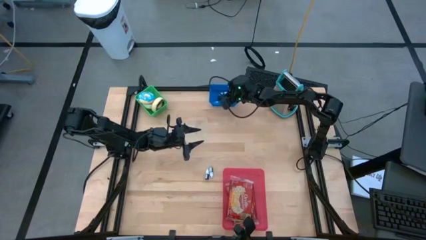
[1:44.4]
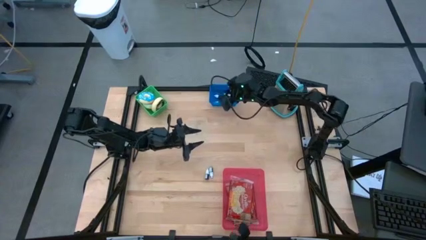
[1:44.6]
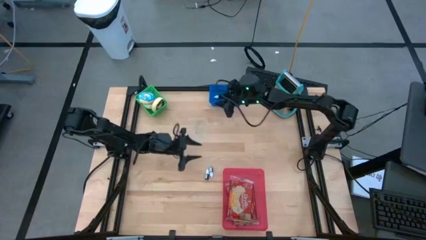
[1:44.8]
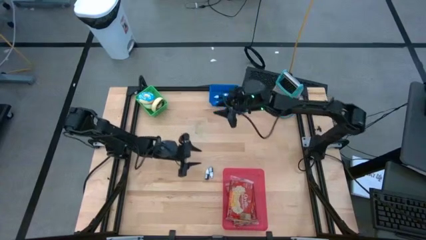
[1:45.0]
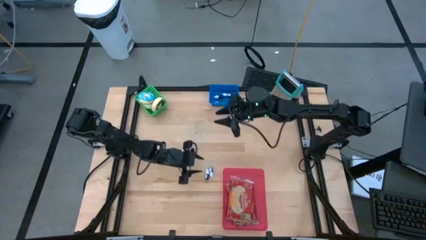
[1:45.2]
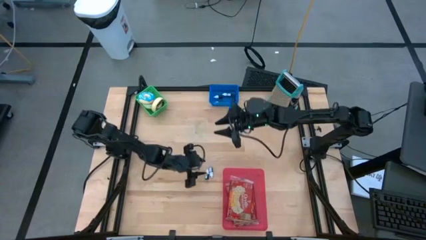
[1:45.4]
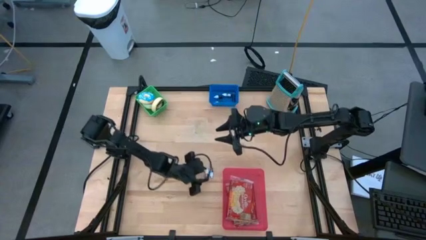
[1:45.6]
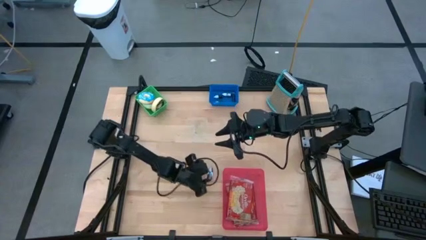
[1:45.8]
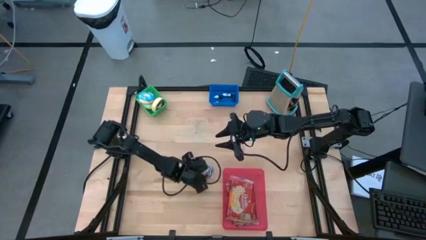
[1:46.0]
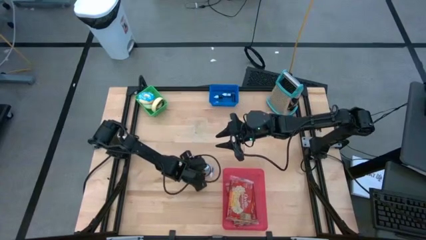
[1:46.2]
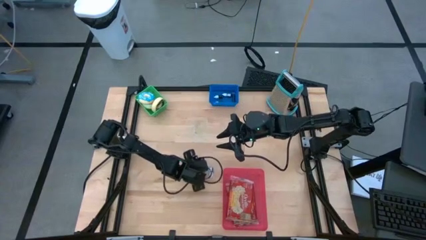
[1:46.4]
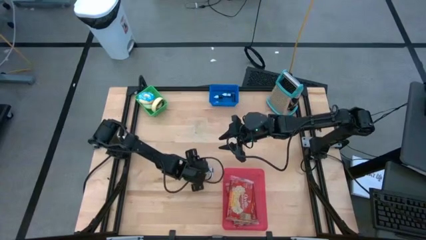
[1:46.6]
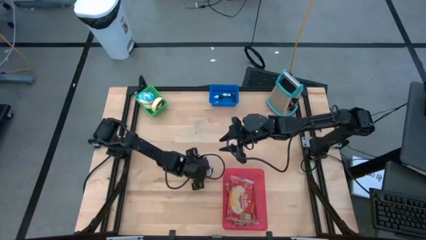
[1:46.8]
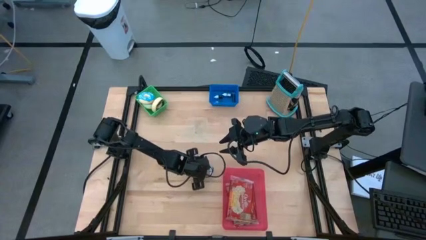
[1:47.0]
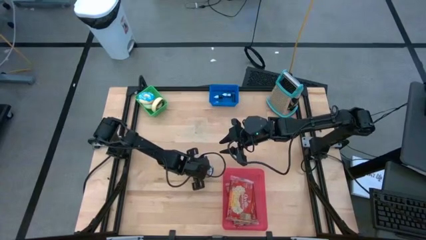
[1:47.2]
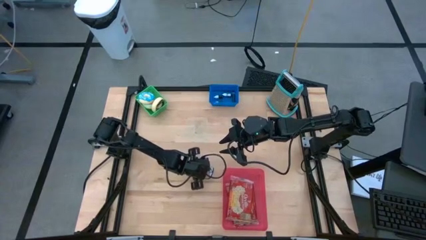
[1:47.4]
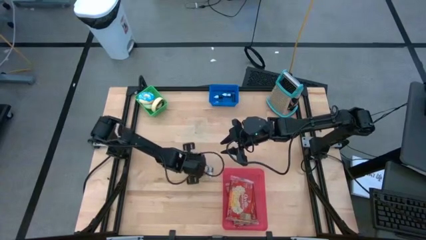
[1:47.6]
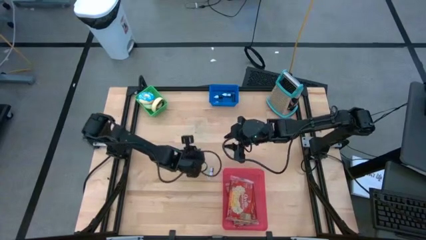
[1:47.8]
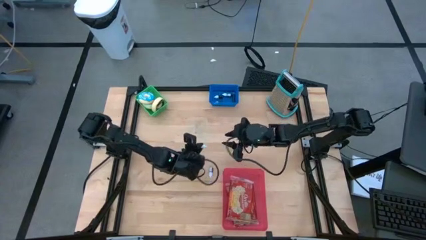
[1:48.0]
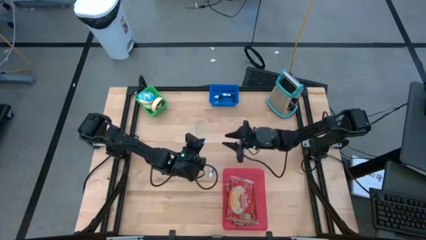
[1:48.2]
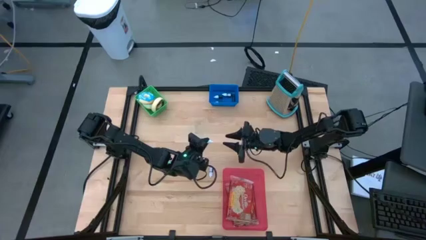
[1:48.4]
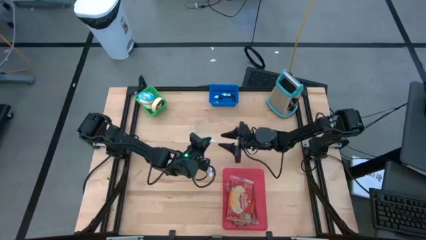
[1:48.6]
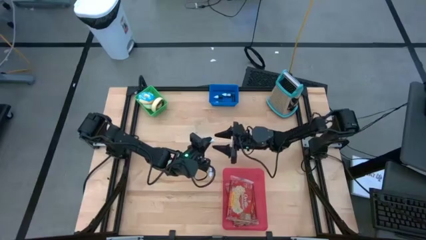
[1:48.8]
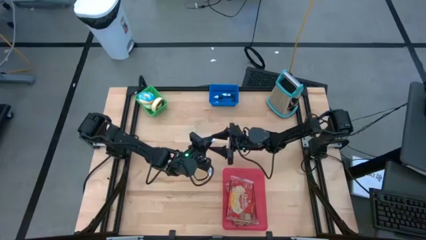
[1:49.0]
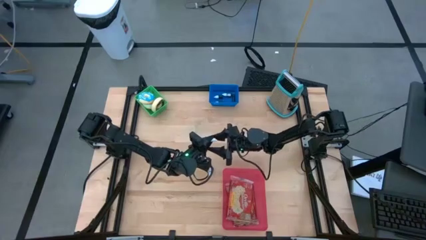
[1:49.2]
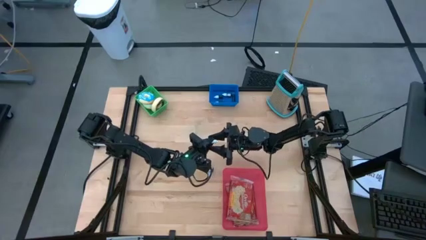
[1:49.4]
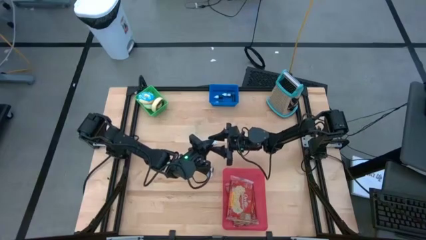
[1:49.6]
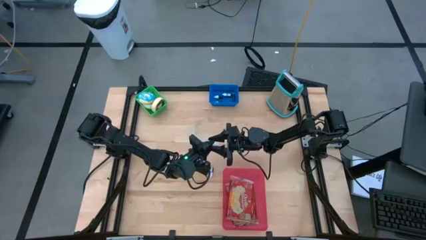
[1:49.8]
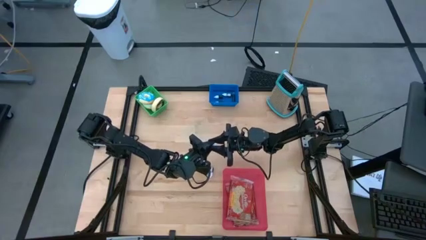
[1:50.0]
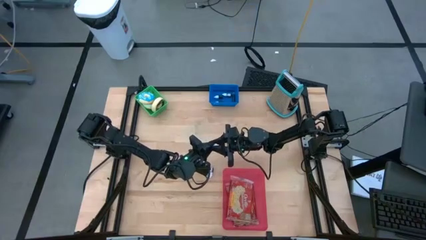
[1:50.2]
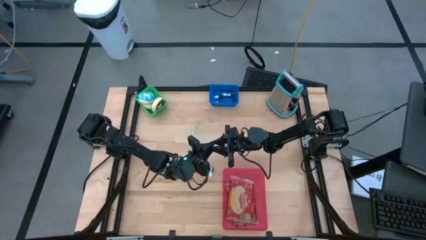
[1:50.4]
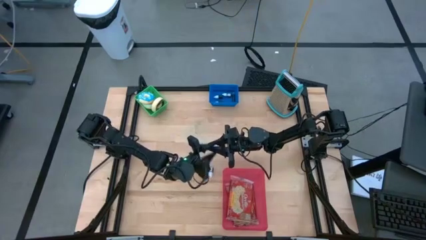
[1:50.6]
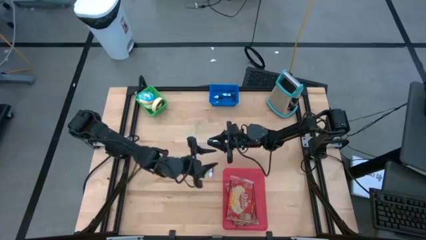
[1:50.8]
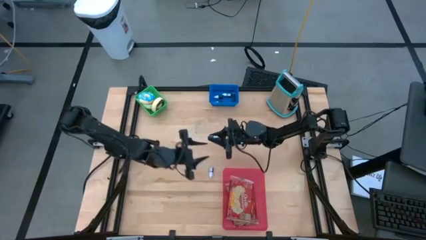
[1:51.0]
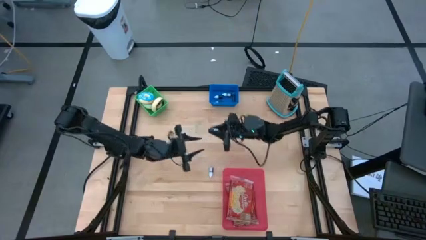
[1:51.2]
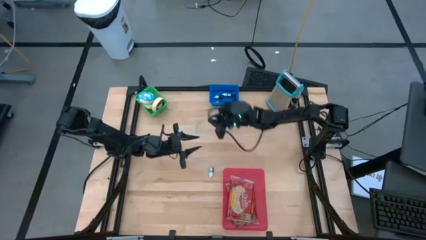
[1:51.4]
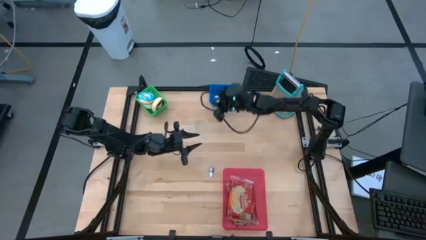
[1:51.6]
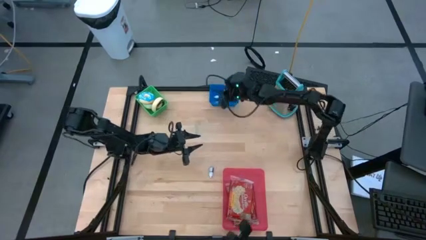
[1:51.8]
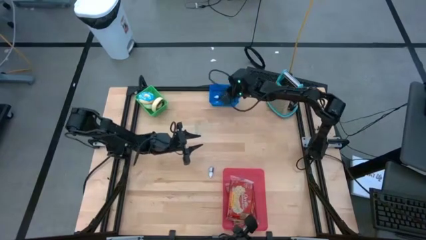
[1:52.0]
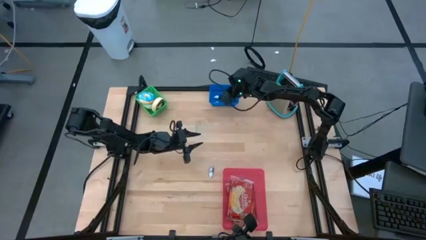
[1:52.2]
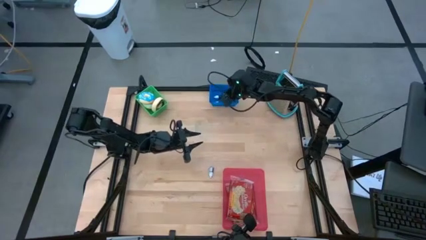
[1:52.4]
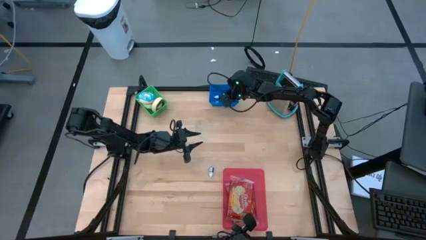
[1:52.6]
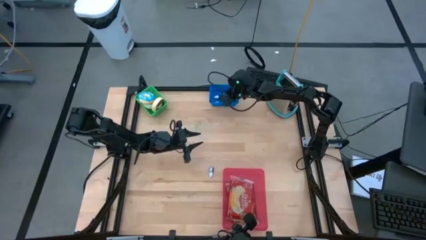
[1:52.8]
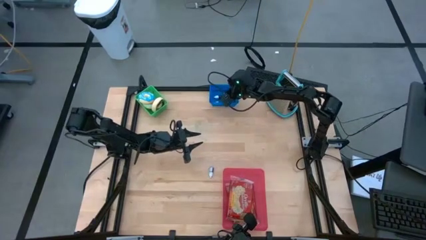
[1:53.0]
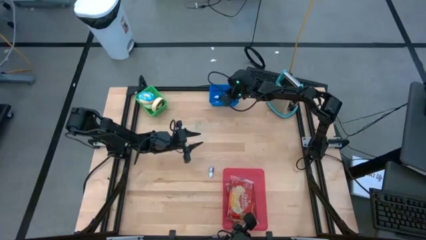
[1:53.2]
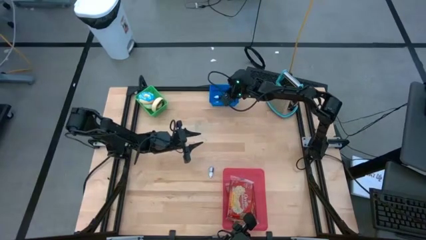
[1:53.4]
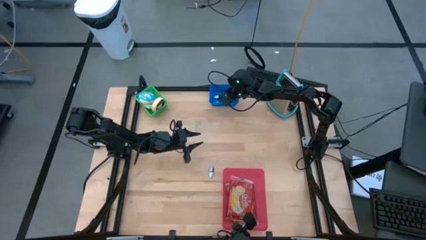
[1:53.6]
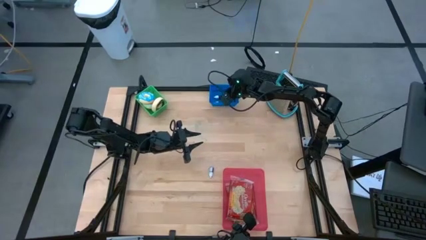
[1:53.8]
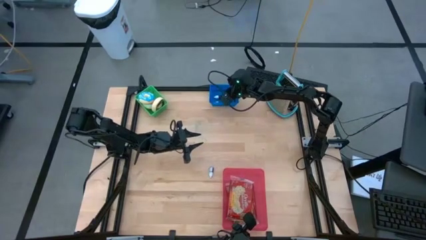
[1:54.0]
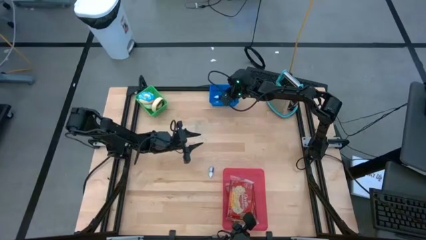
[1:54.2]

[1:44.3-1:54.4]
Put the black food coloring into the blue bin

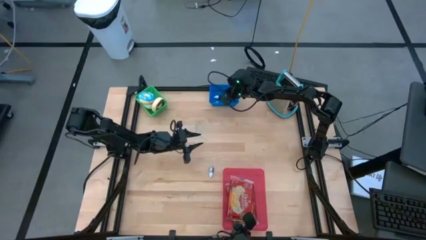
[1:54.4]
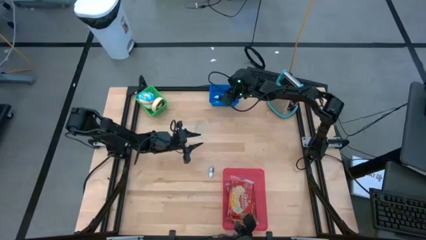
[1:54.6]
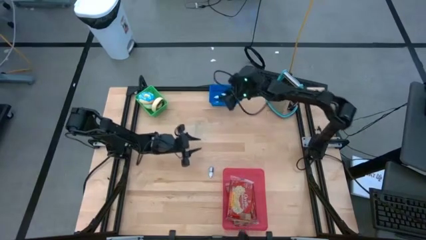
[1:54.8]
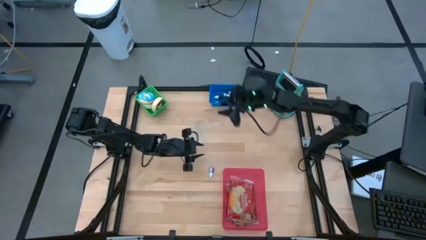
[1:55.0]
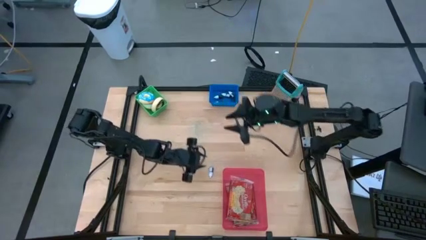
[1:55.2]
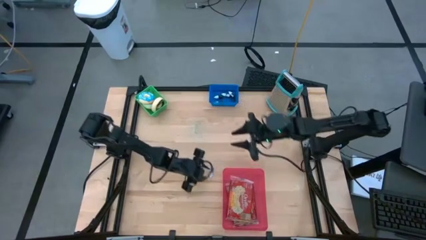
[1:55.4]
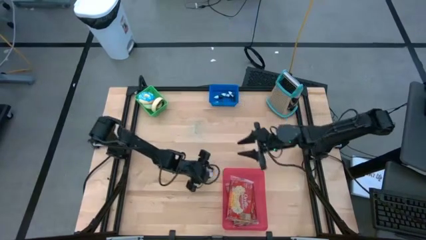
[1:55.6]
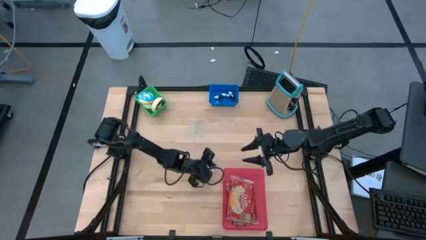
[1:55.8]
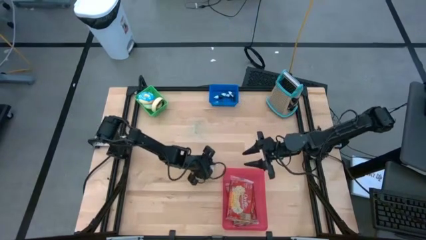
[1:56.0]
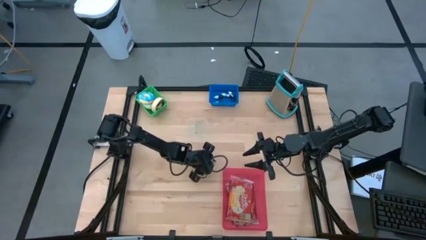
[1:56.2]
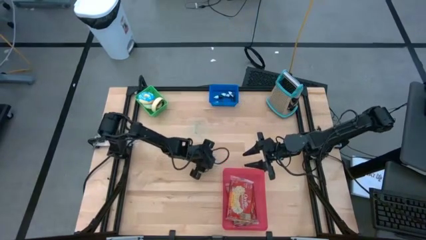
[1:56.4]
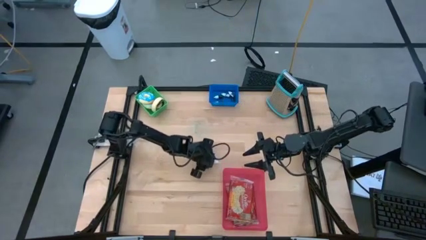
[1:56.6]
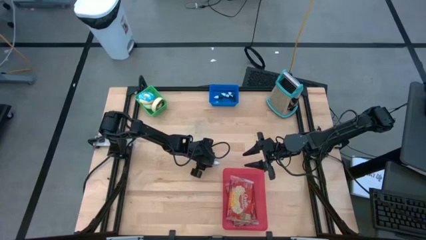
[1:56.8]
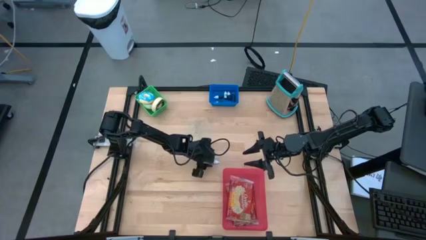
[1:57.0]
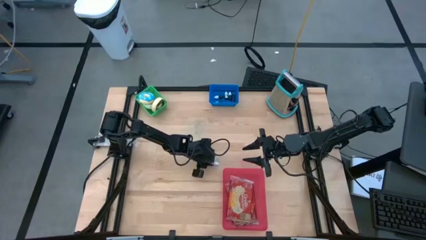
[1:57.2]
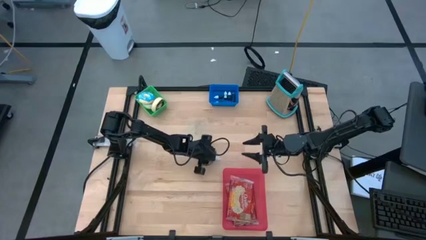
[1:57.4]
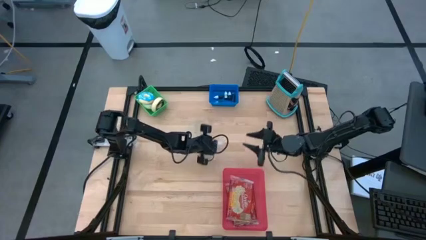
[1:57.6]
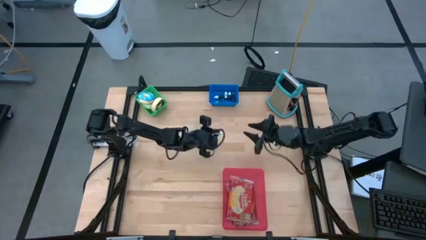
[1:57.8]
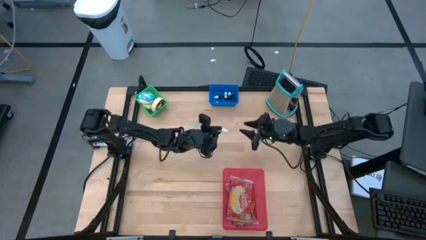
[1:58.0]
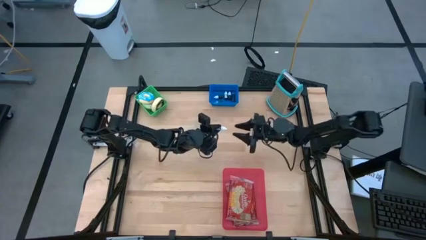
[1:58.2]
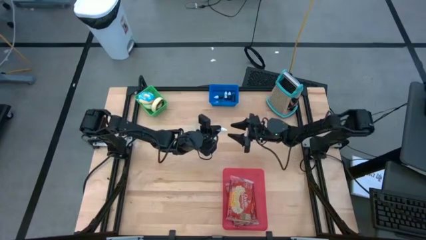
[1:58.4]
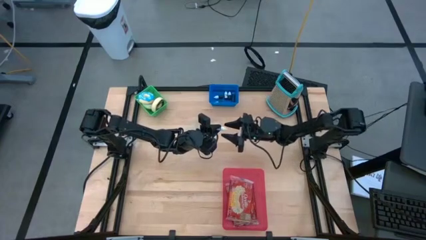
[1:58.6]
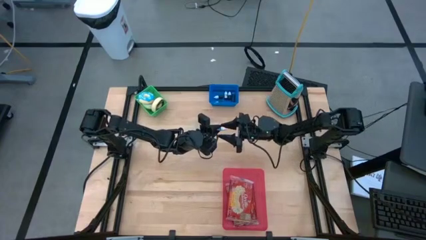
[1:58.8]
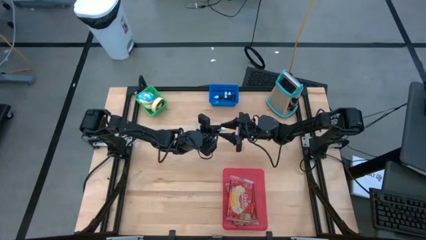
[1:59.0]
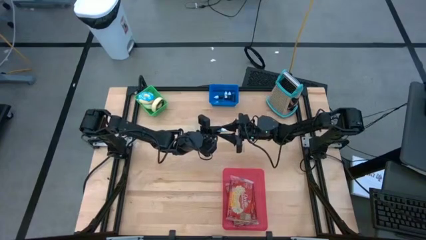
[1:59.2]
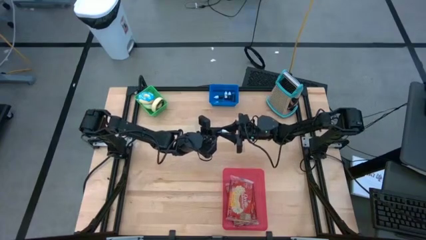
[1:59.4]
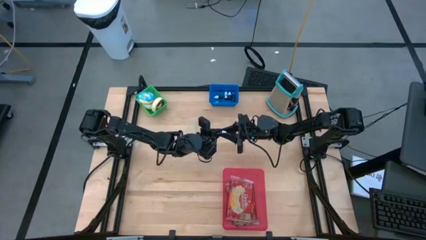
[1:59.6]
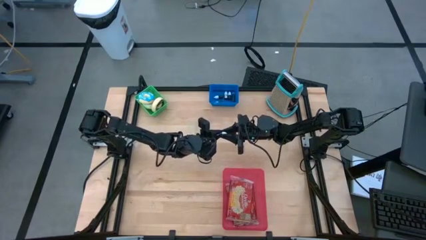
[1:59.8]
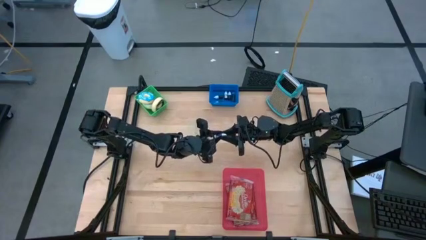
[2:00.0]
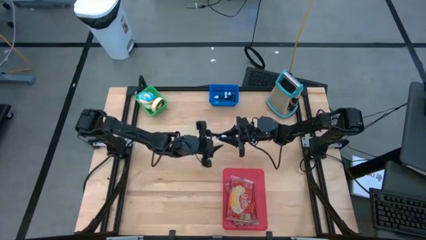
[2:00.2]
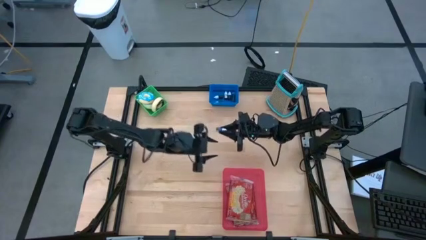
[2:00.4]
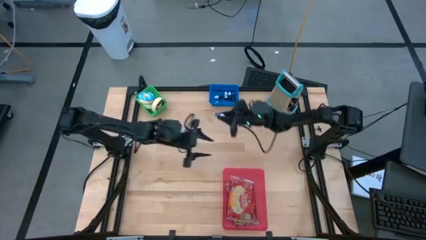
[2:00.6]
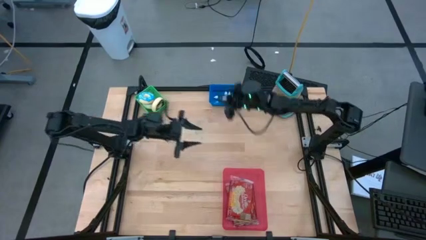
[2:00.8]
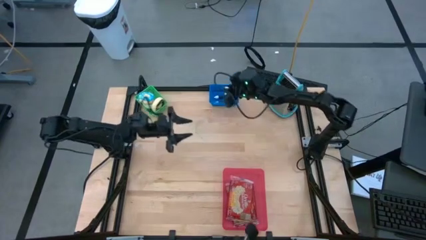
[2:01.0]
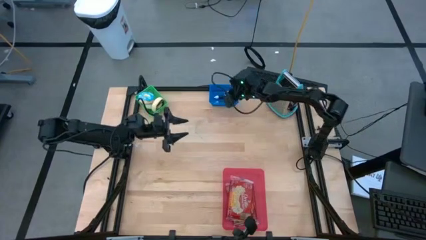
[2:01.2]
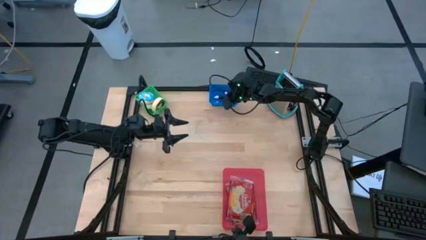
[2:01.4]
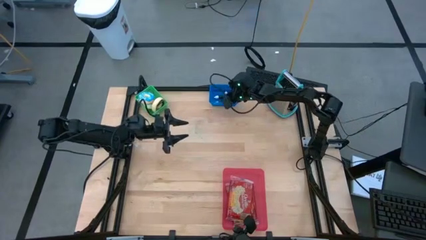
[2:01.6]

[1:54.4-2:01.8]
Put the blue food coloring into the blue bin
